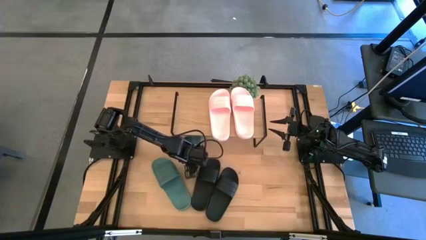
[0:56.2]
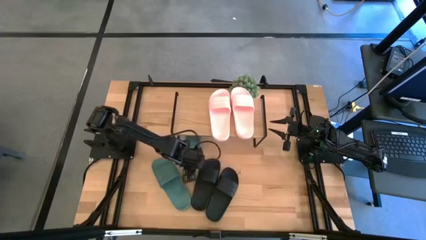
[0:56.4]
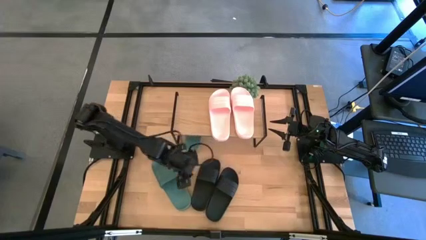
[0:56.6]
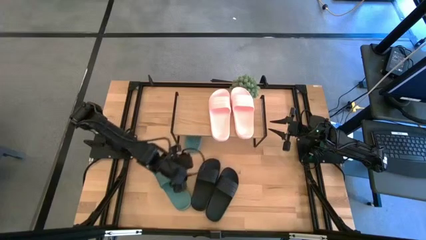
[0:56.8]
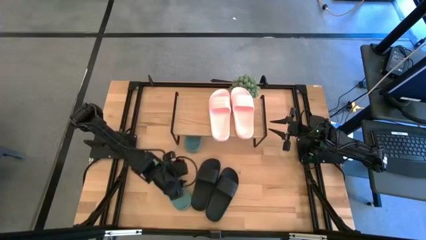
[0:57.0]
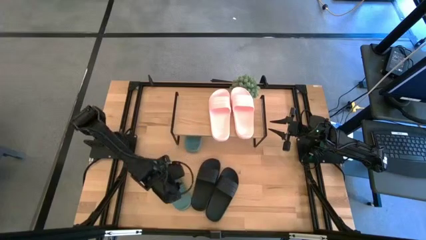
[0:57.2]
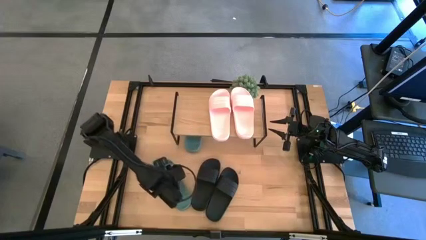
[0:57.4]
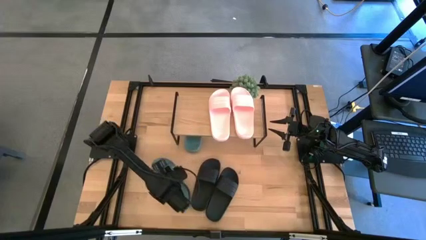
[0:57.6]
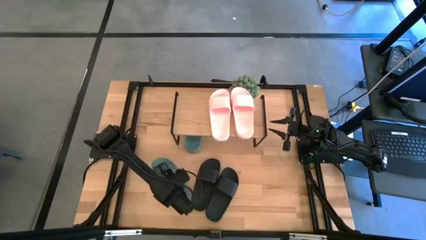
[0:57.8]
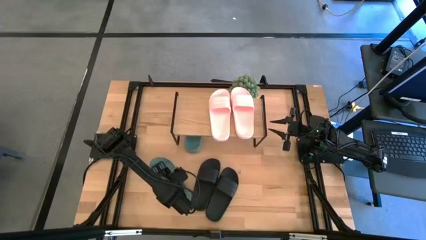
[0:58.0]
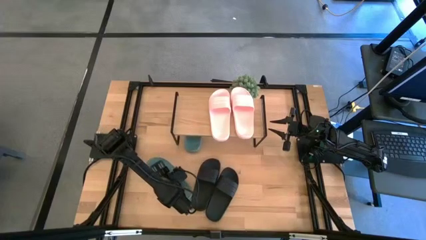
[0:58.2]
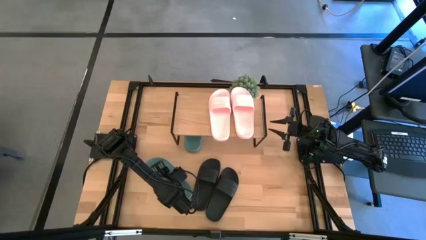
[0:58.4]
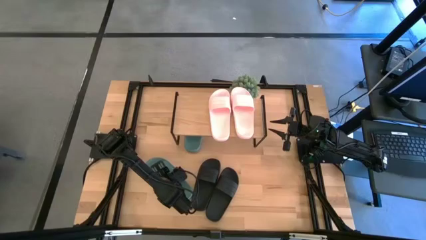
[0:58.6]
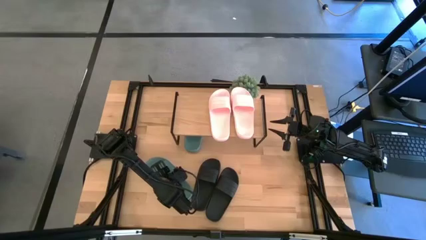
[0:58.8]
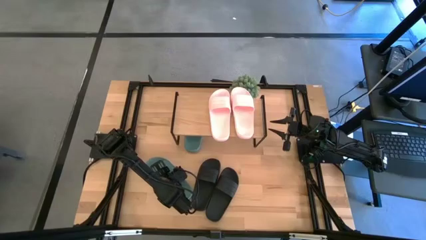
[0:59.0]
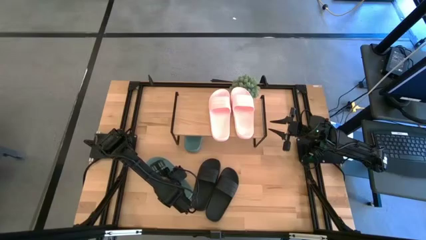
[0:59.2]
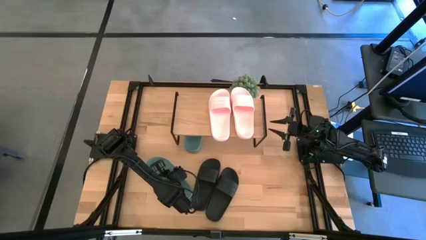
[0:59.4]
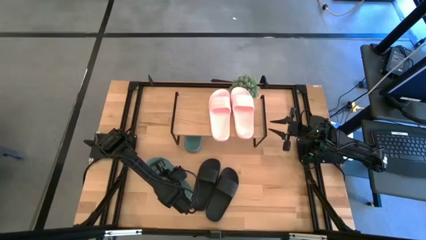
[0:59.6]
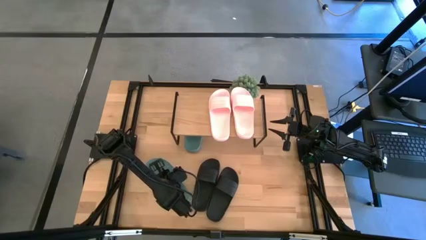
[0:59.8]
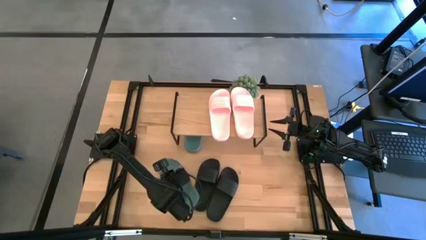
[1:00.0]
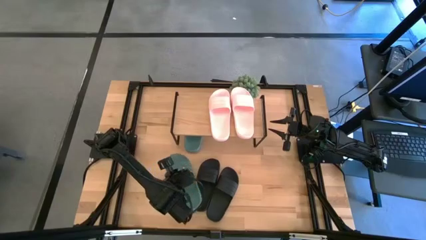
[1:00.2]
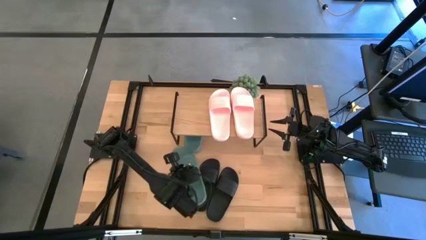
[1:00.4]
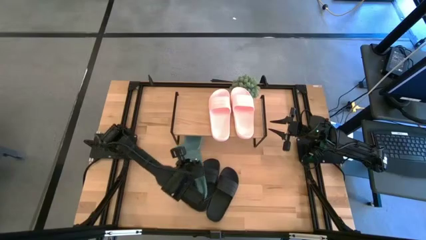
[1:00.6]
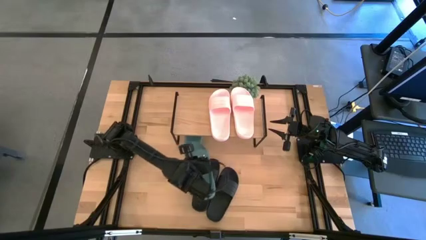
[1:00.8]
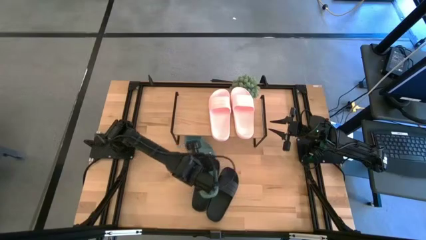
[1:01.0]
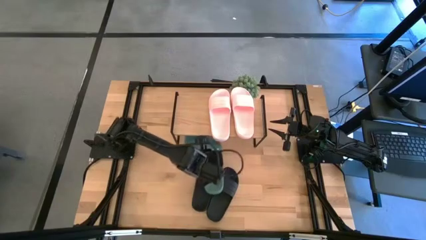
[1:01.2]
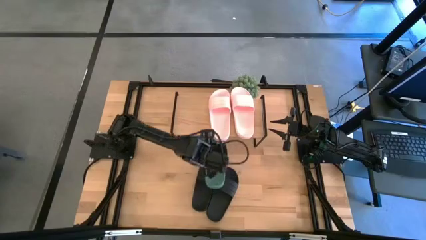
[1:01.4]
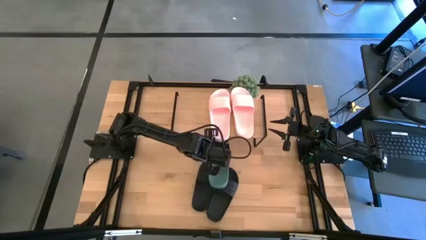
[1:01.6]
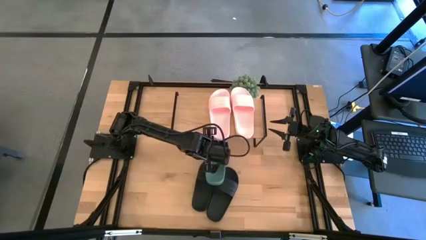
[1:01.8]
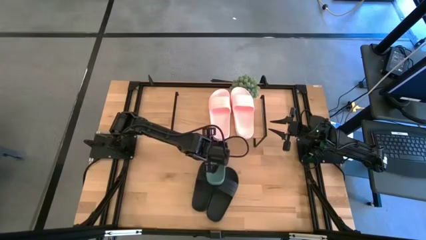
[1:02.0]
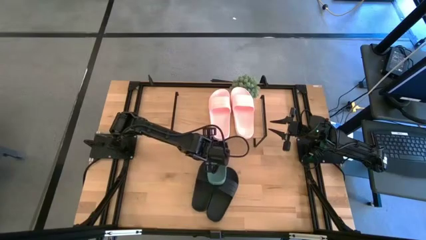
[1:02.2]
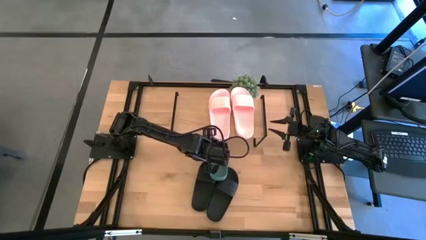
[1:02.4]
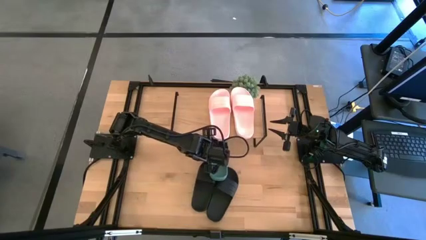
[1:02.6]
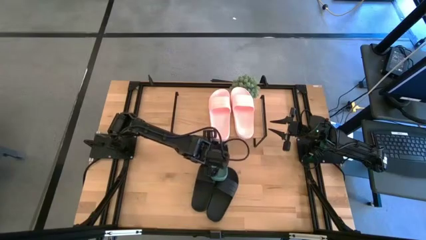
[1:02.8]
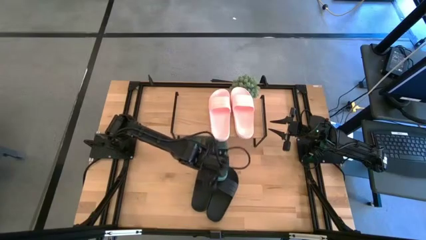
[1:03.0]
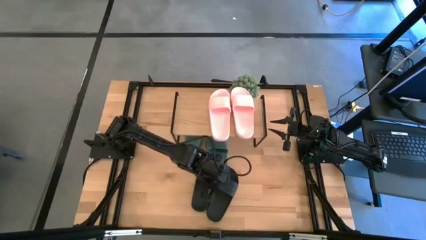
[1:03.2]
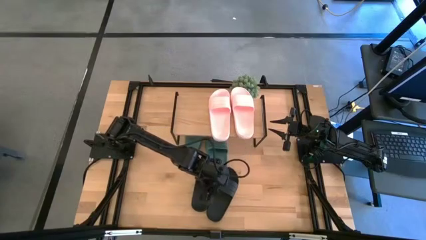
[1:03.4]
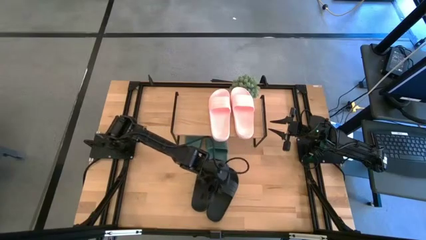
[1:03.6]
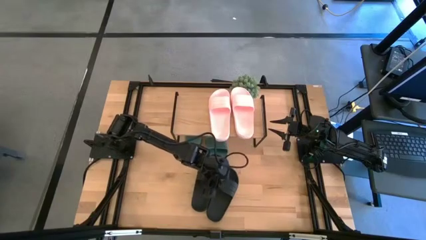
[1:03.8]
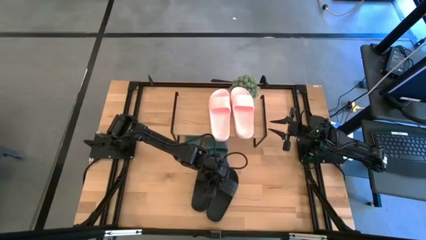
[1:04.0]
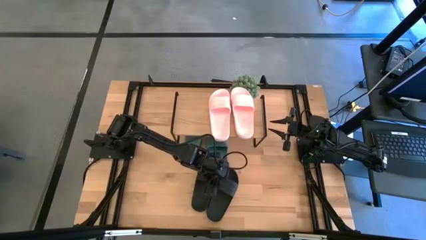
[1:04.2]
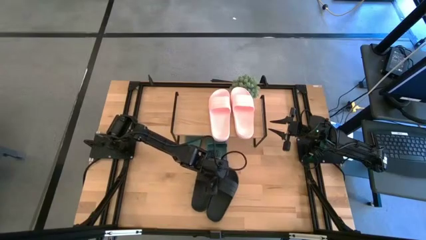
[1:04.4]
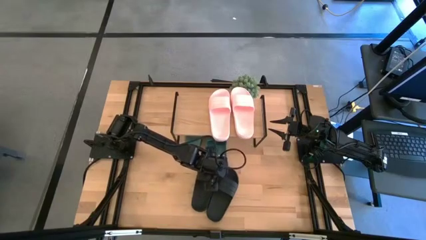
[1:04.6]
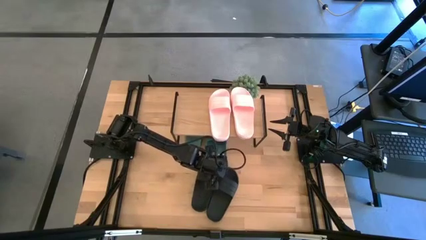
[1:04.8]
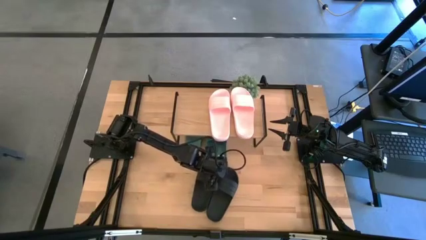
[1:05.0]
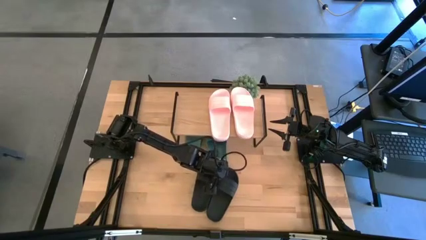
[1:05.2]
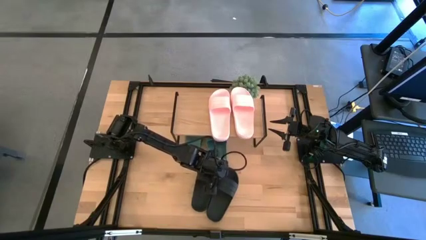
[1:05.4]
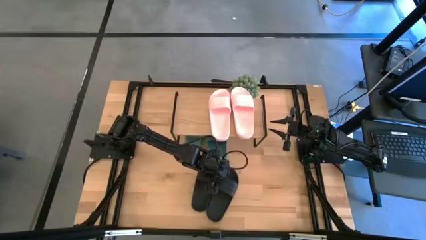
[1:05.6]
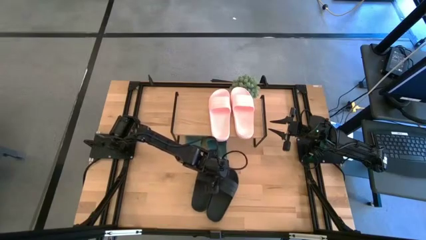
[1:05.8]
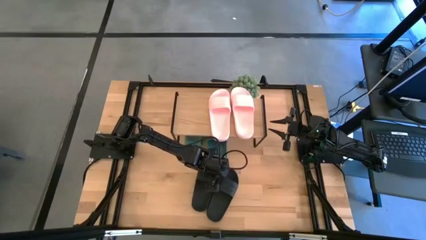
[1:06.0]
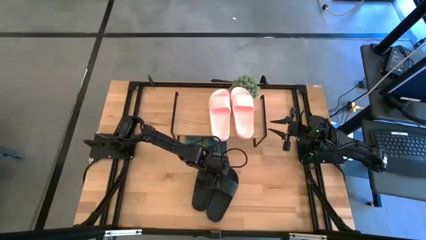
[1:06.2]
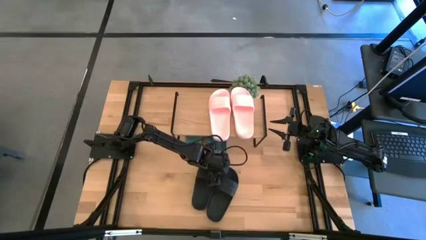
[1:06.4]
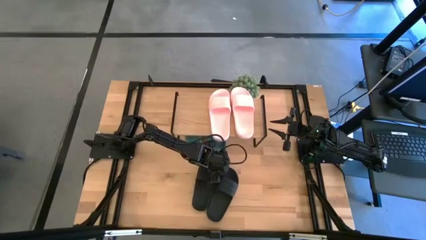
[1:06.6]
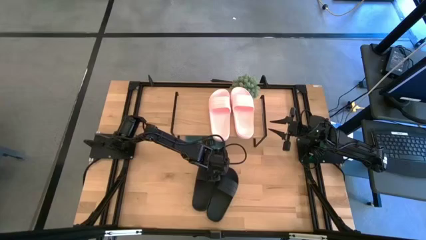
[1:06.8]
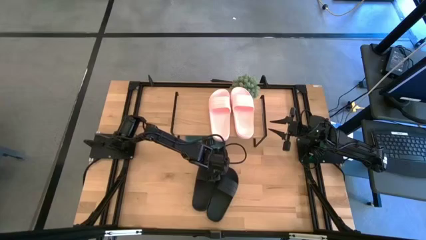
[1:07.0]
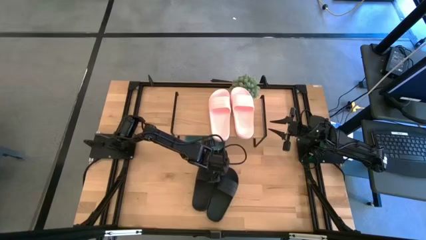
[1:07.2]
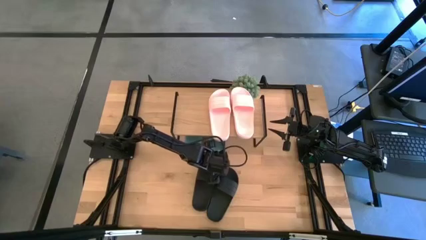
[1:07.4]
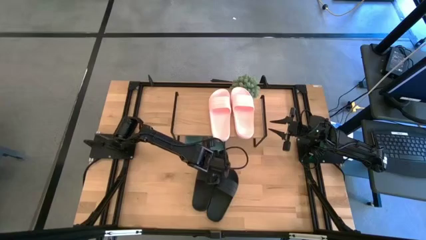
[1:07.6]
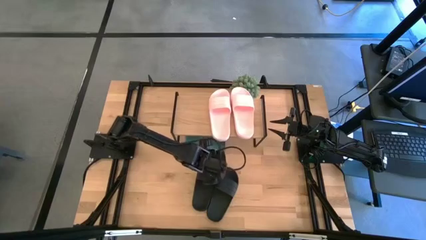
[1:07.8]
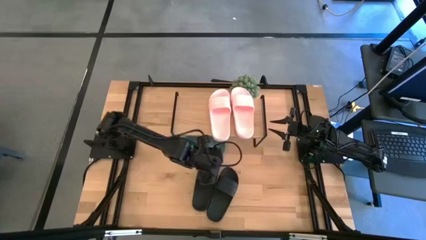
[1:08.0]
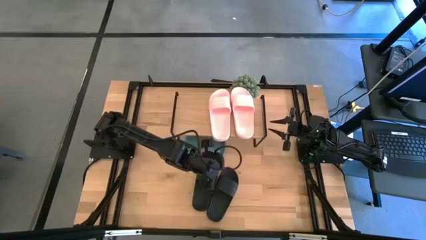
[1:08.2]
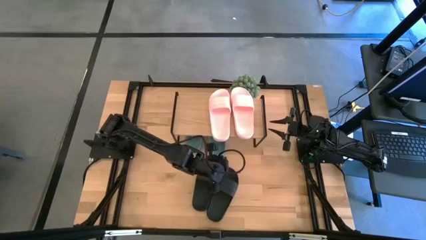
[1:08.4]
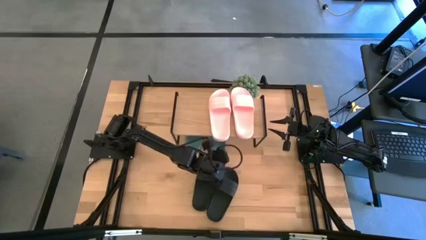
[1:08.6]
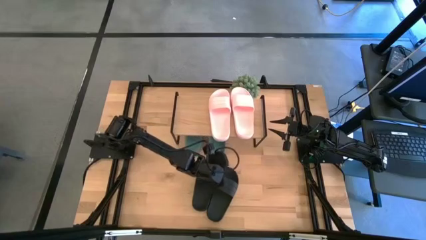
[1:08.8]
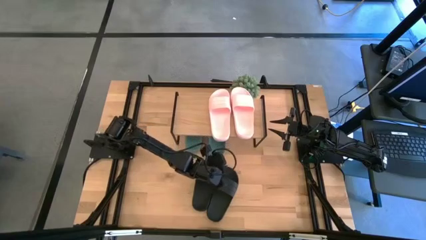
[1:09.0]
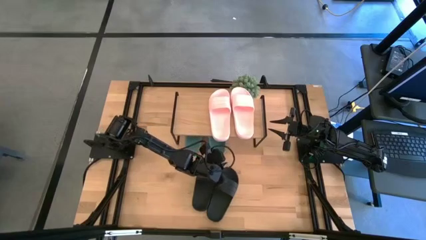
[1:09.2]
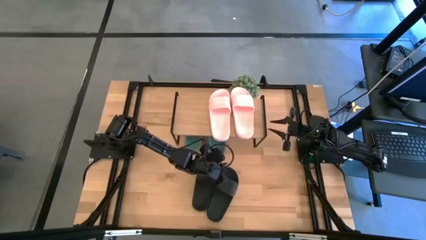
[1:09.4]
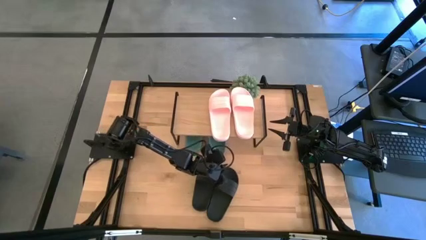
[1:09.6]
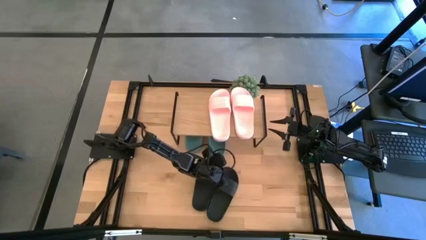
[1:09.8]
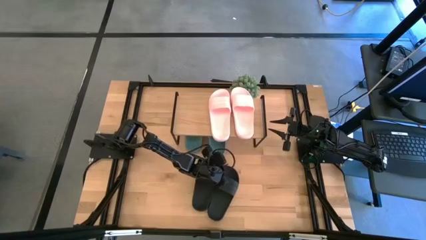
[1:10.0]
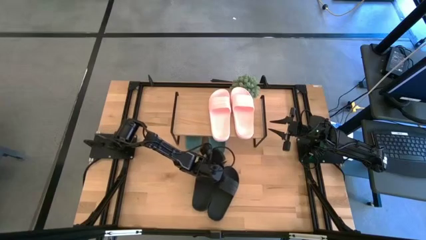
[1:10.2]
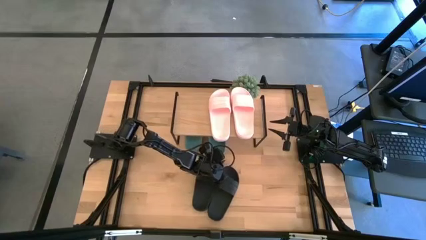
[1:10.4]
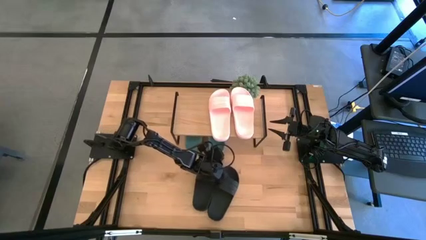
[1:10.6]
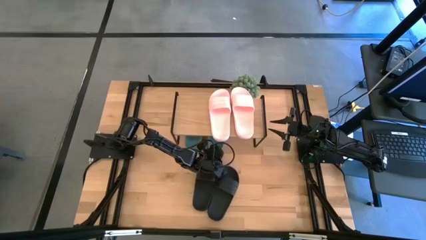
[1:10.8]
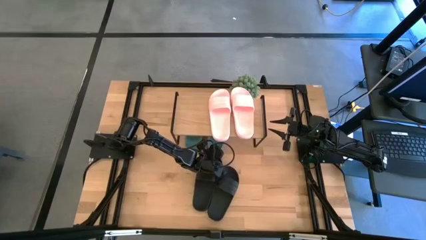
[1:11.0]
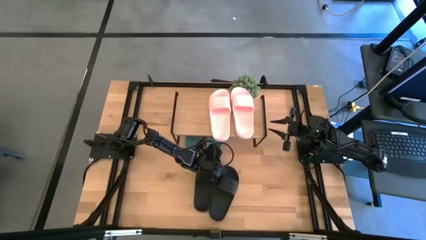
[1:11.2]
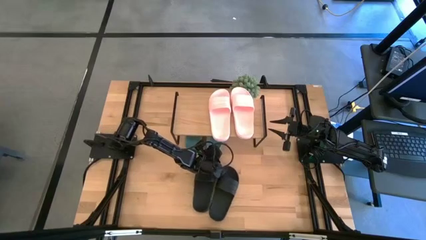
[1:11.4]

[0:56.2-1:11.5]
Task: Pick and place slides into the shelf
Put the green slide under the shelf
